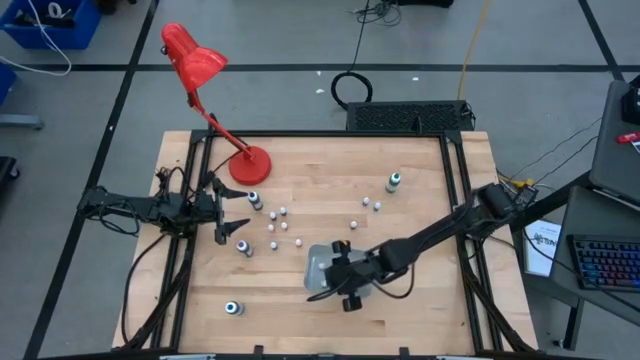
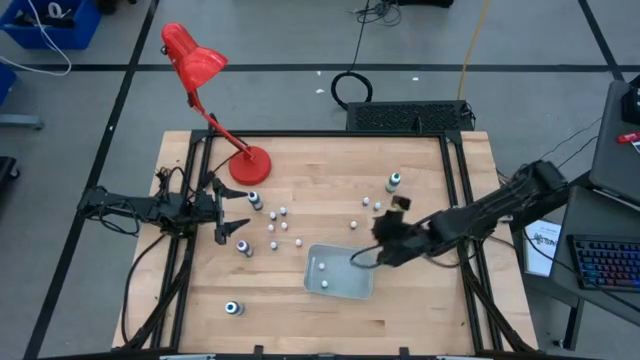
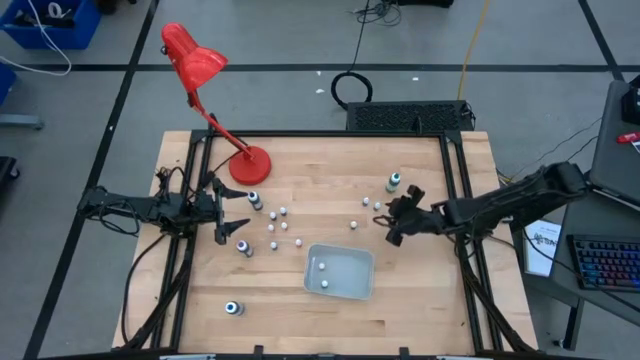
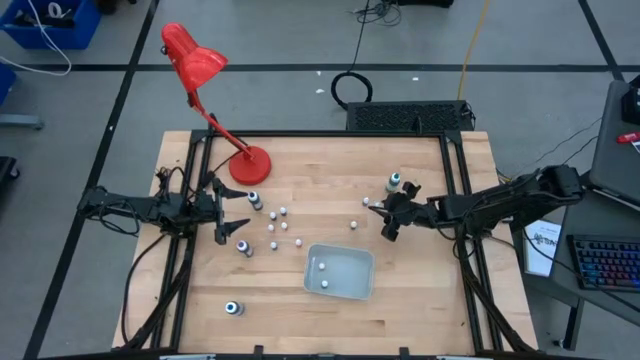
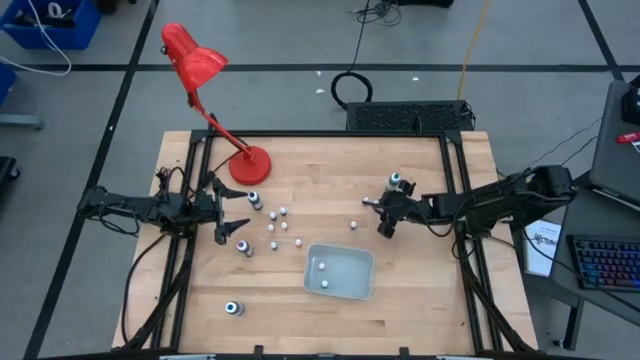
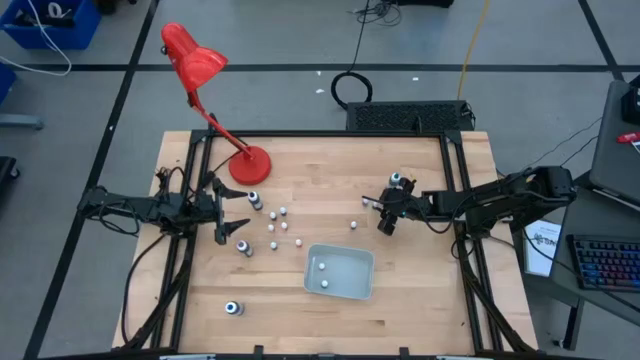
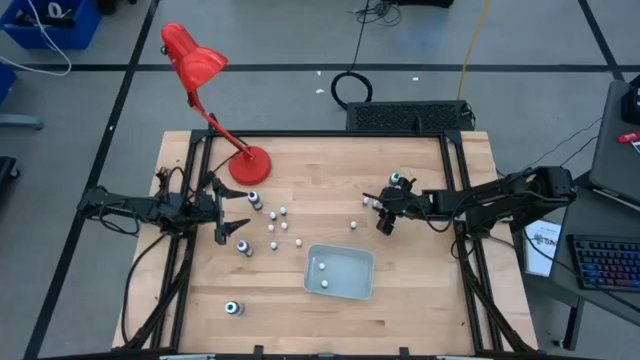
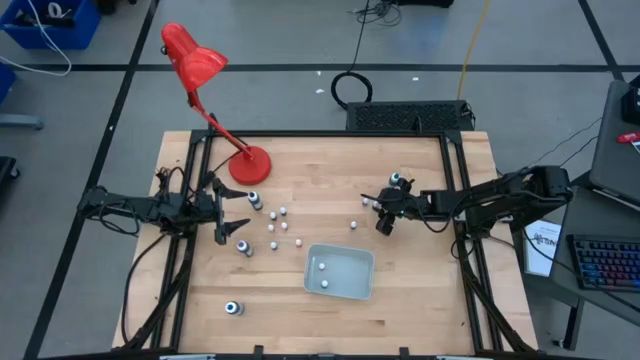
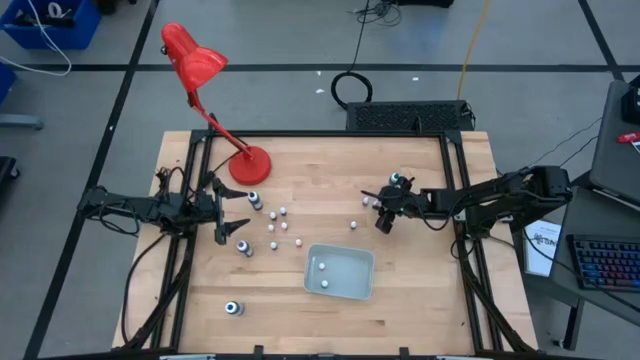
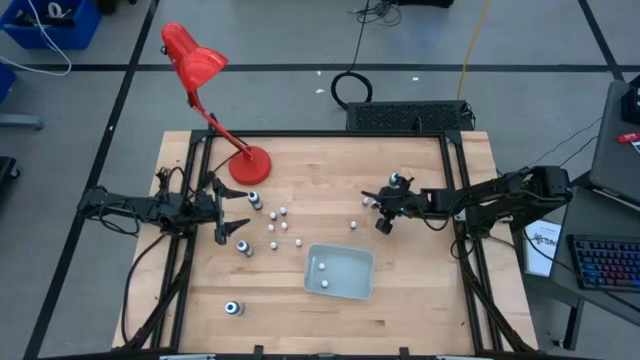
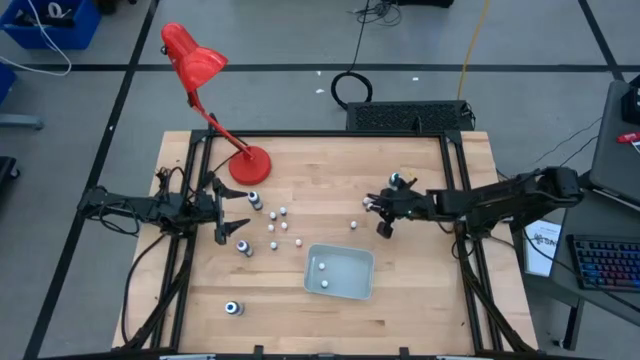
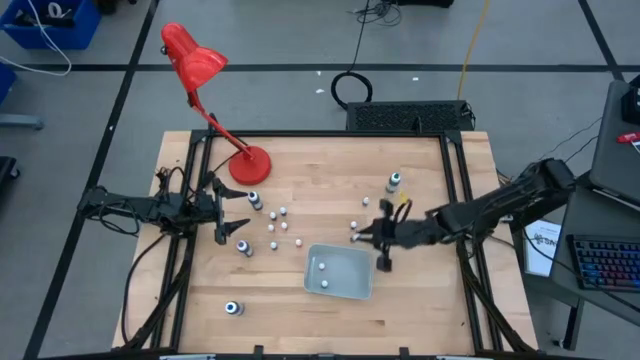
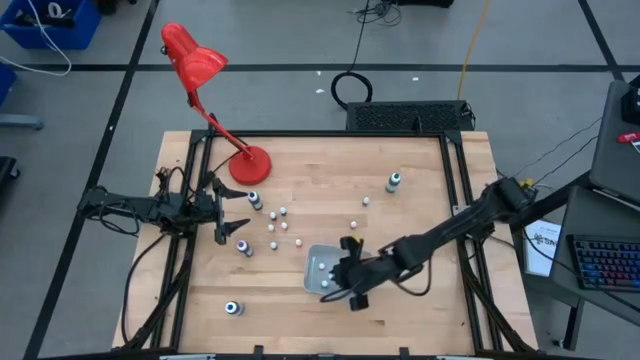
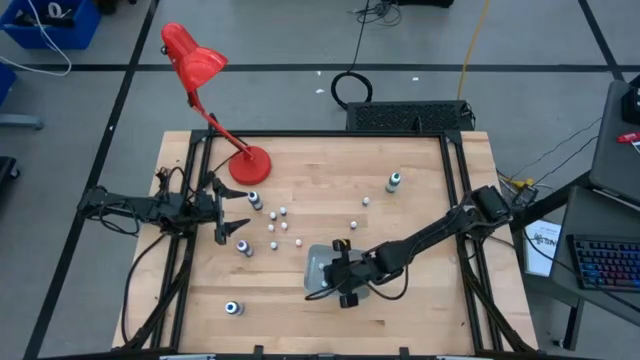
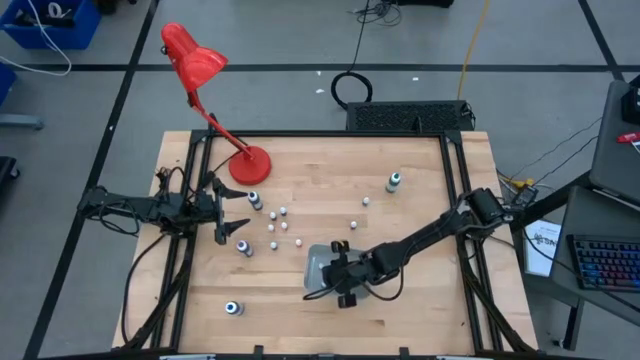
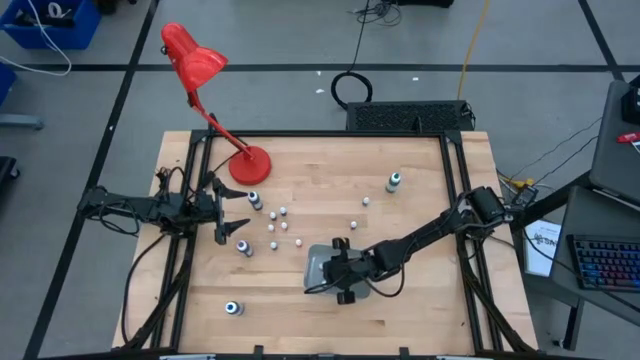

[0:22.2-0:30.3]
Task: Pick & Place food coloring
Put the small dark blue food coloring bottle into the gray bin

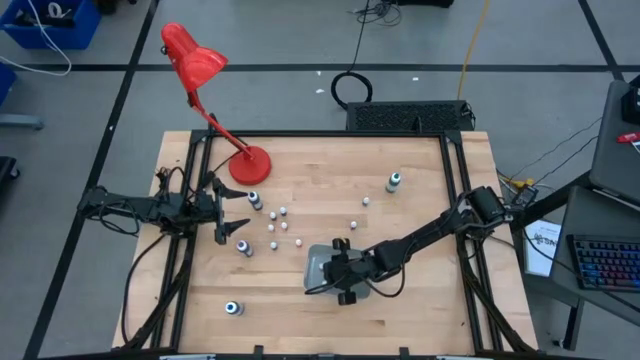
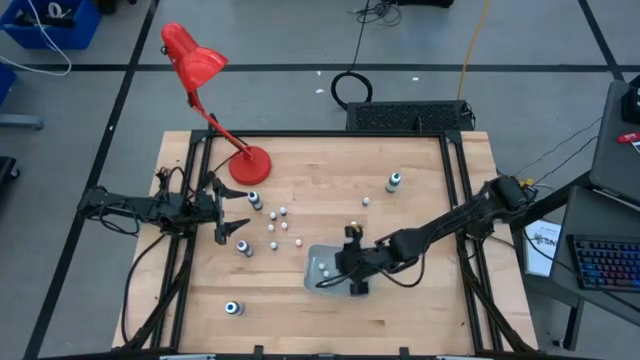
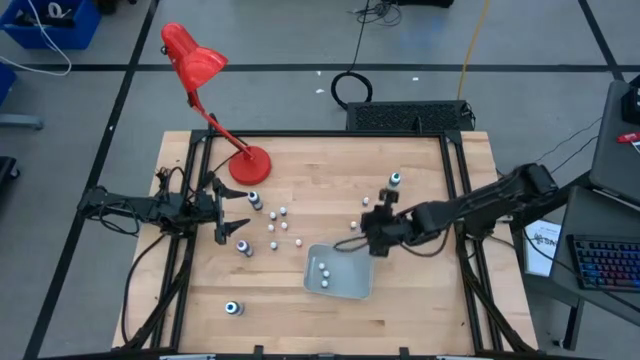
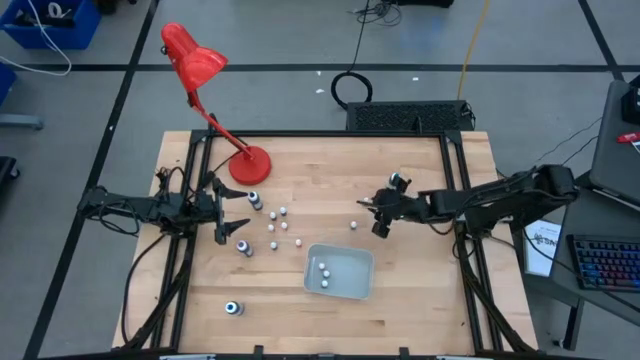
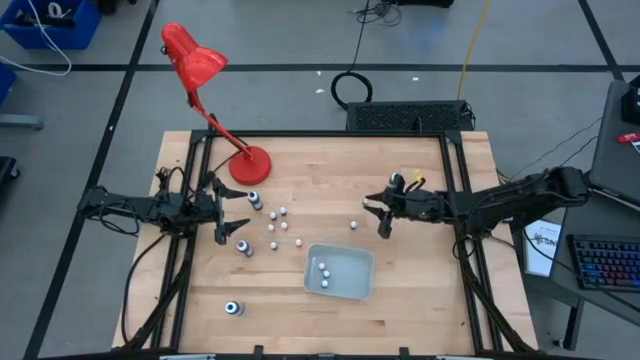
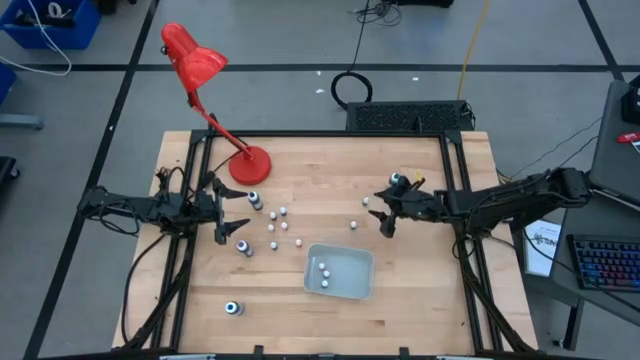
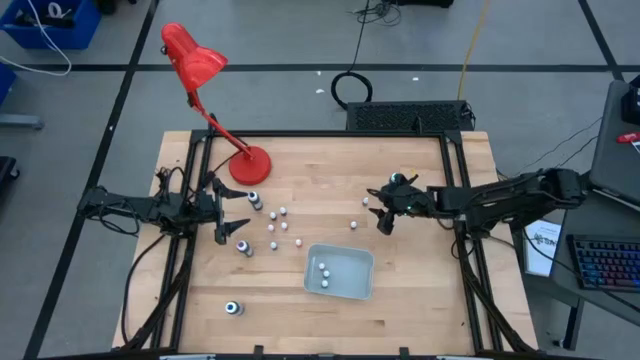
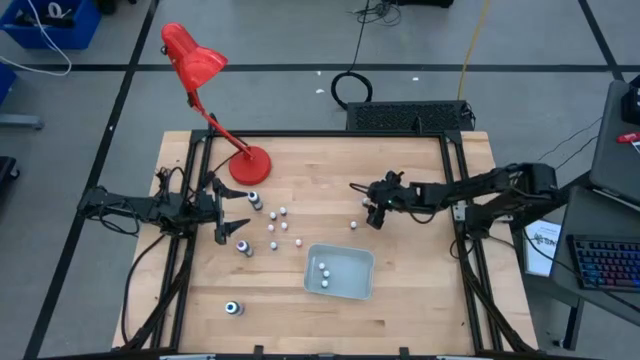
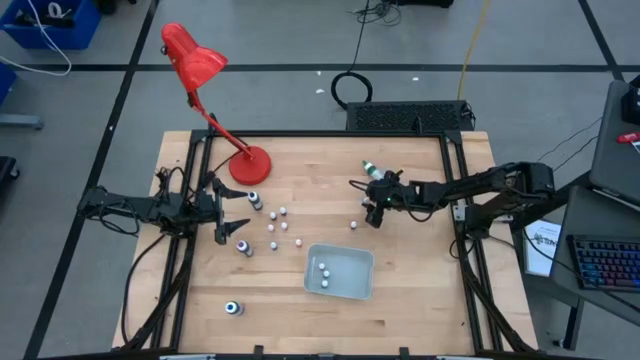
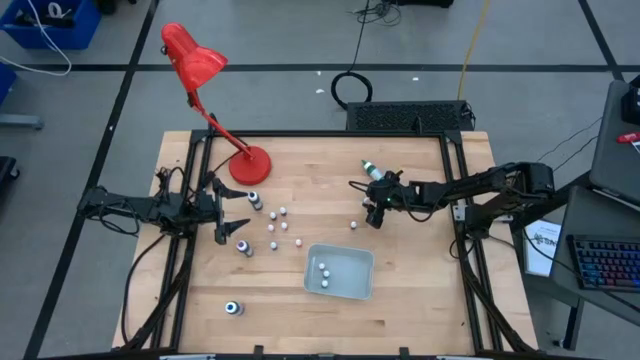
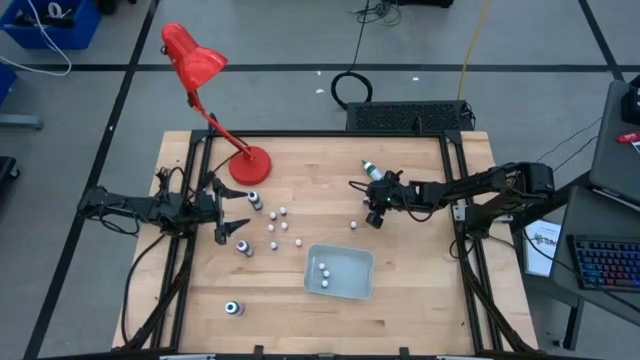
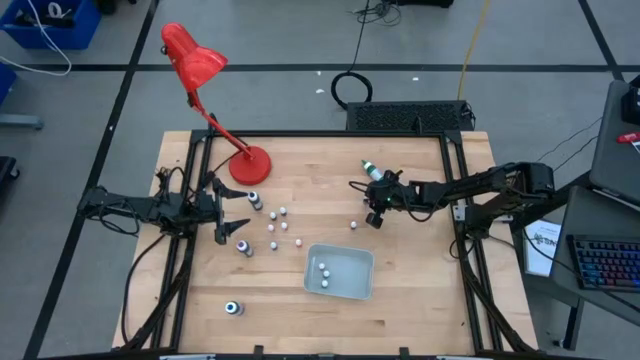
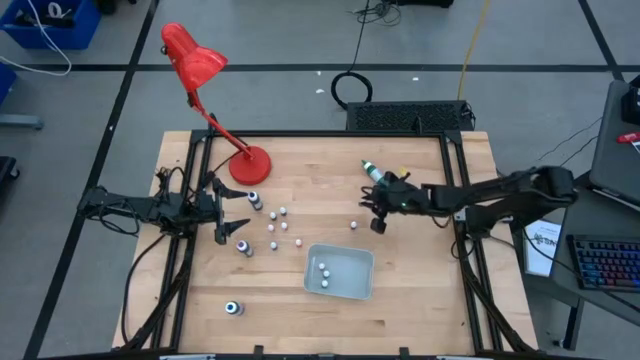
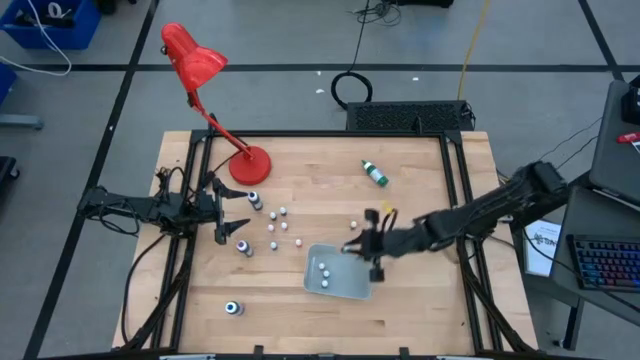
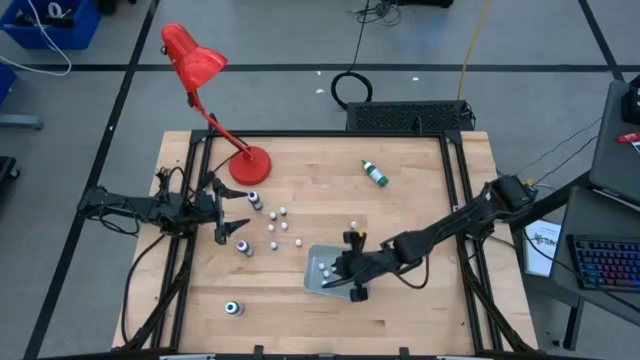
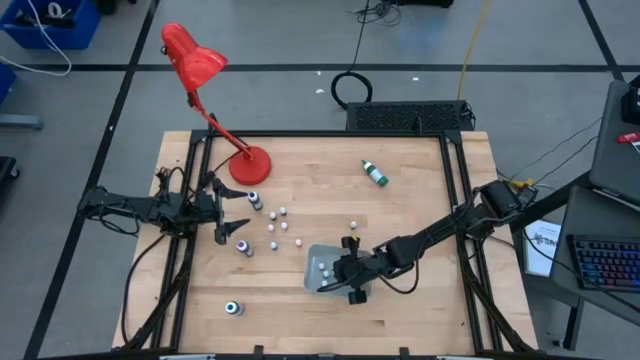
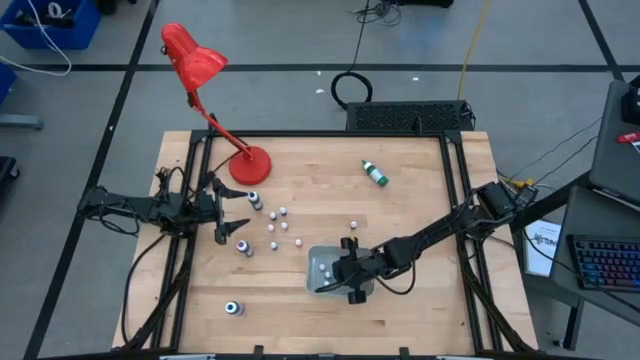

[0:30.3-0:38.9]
Put the small green food coloring bottle into the gray bin

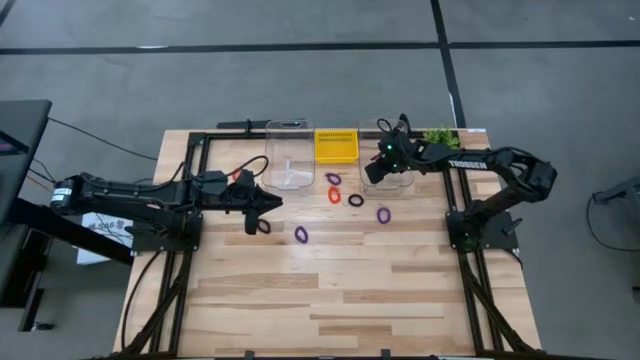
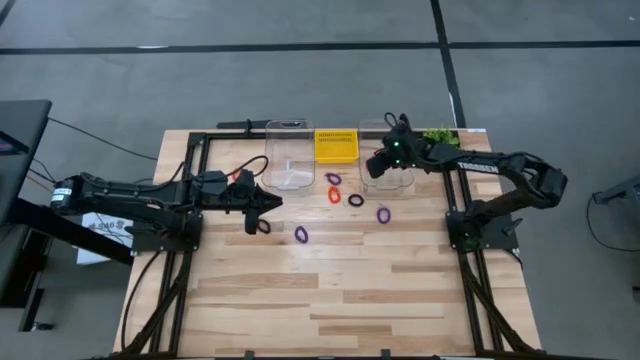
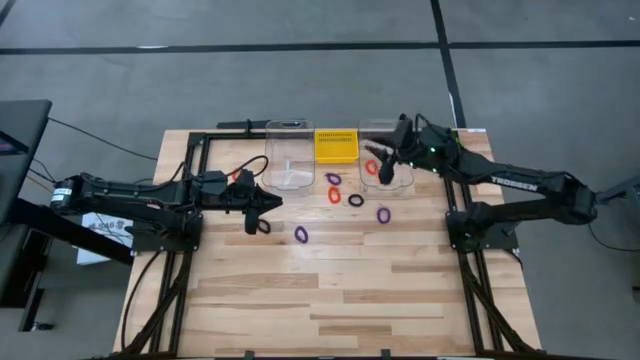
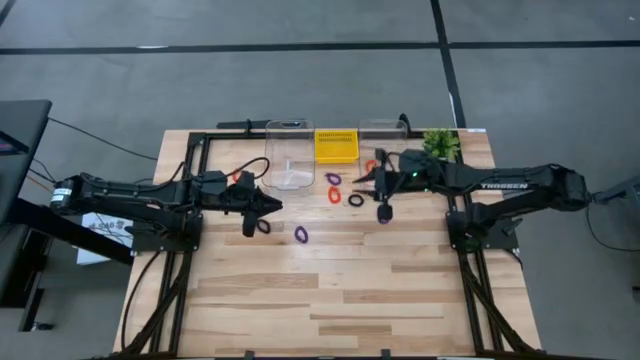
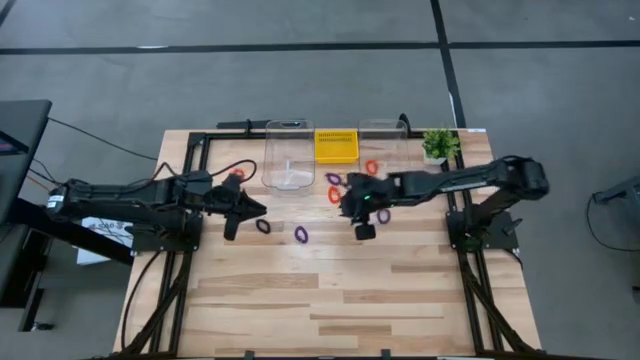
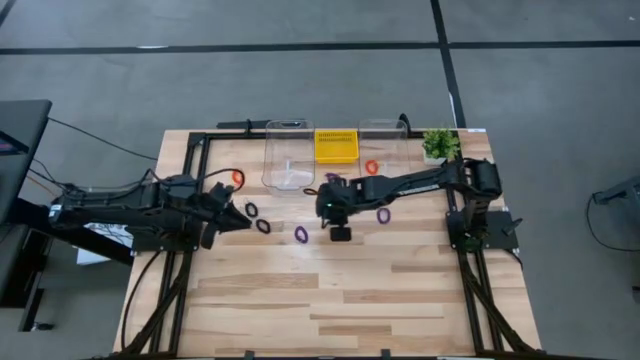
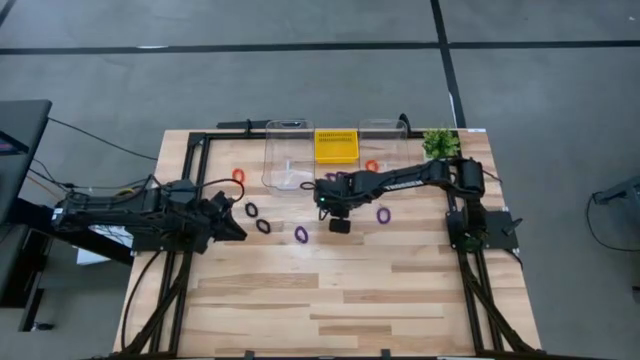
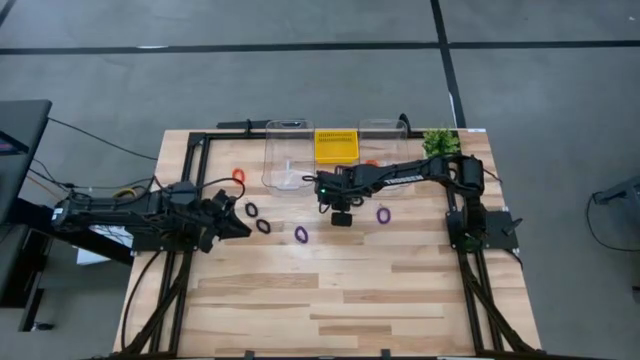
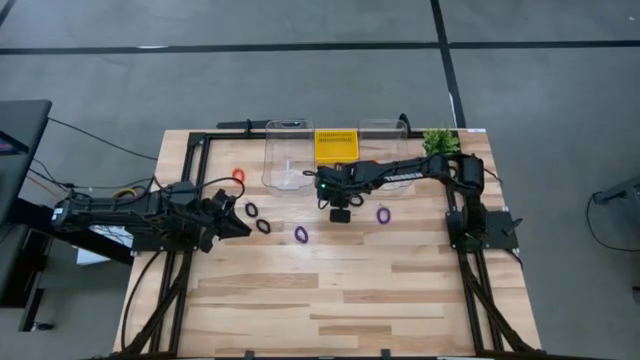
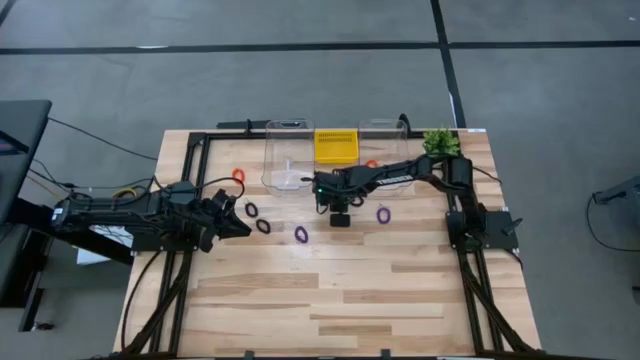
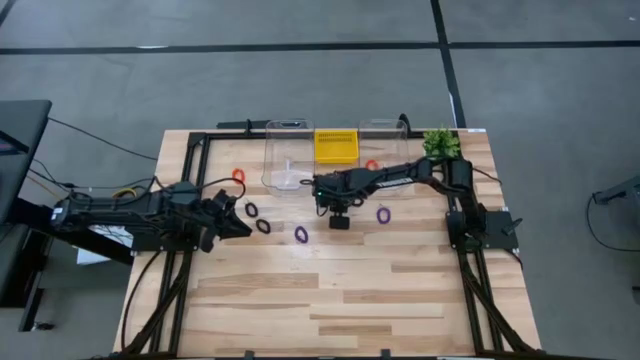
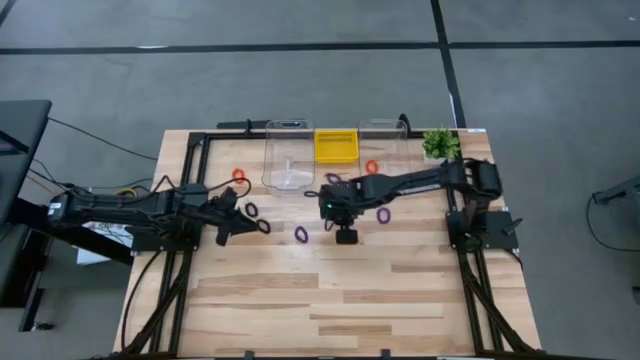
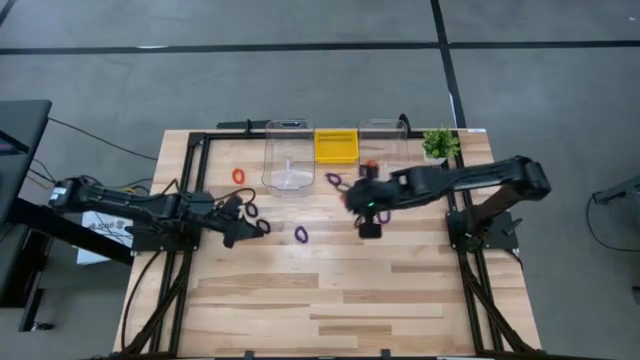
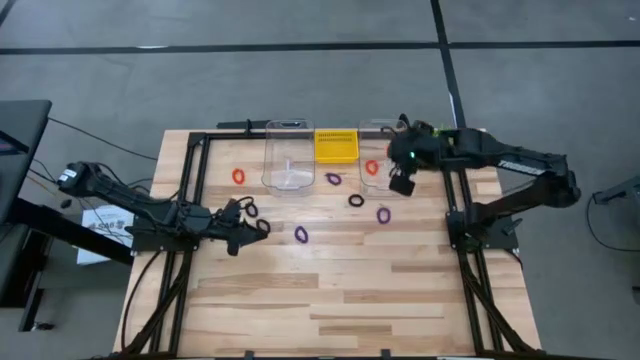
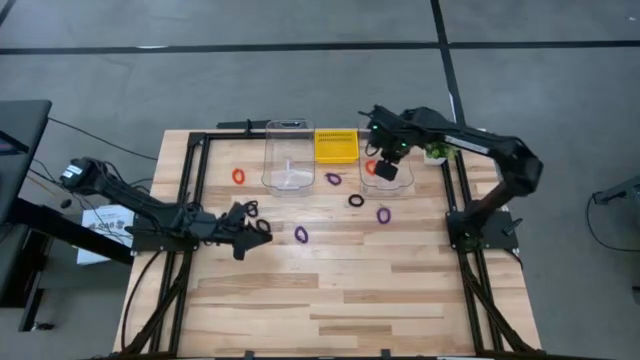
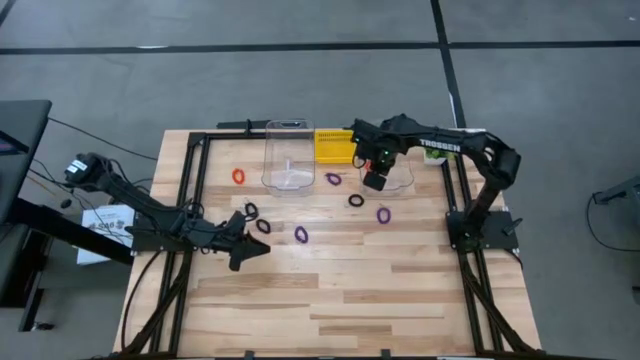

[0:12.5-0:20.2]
Task: Sort spring keychains
Put the right orange spring keychain into the right transparent bin
